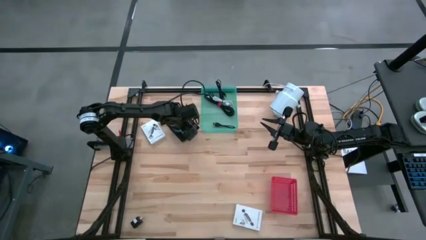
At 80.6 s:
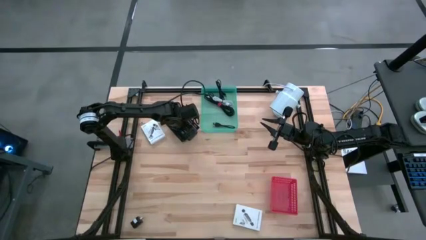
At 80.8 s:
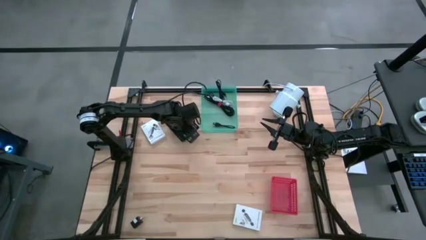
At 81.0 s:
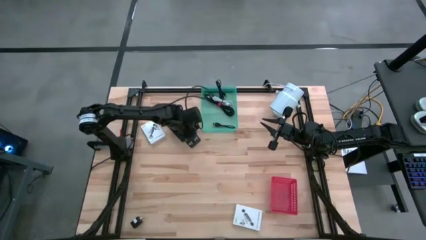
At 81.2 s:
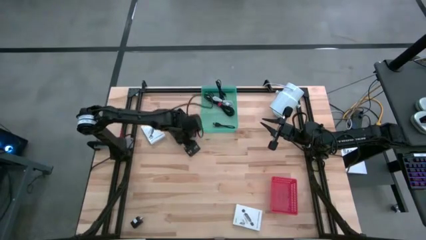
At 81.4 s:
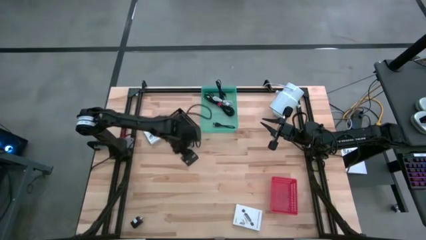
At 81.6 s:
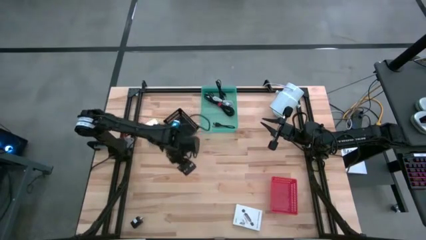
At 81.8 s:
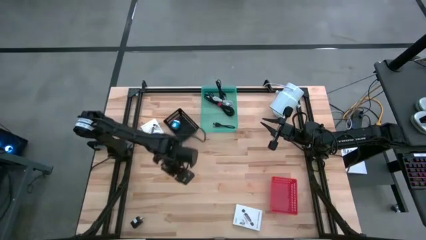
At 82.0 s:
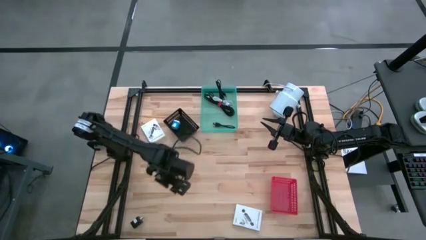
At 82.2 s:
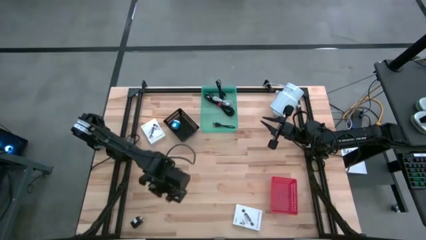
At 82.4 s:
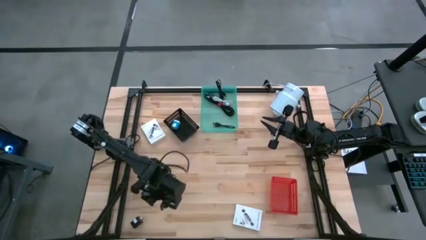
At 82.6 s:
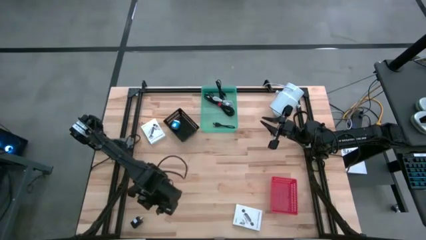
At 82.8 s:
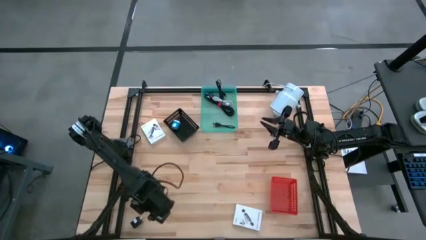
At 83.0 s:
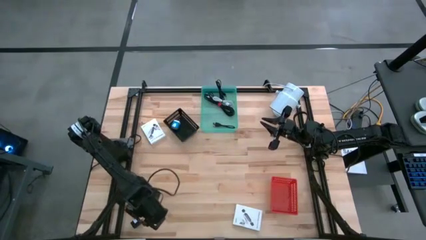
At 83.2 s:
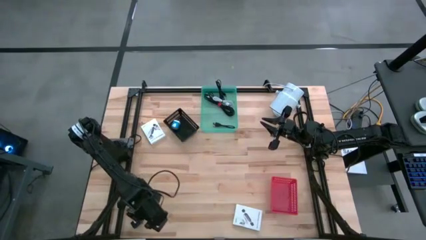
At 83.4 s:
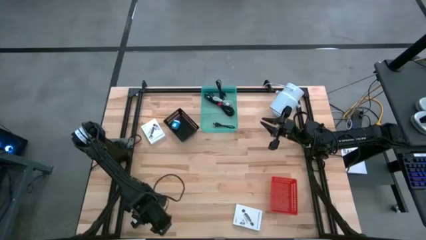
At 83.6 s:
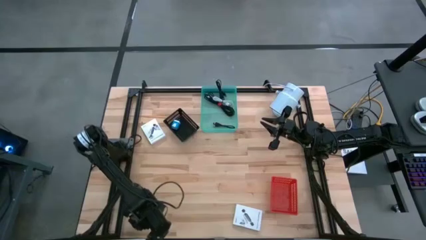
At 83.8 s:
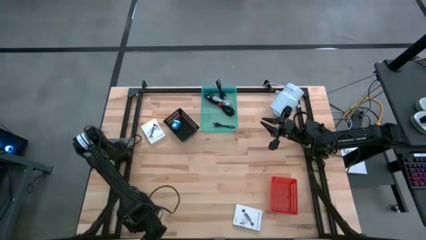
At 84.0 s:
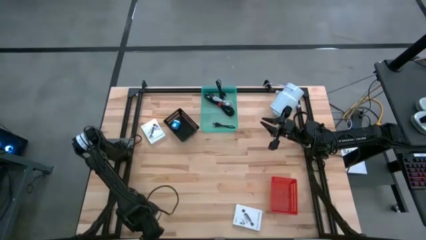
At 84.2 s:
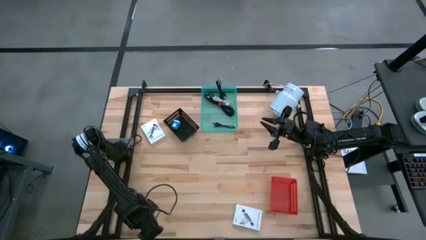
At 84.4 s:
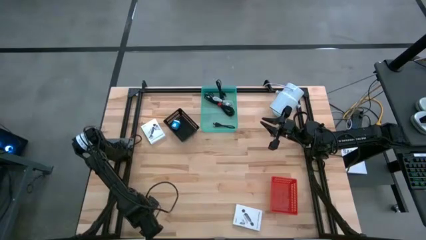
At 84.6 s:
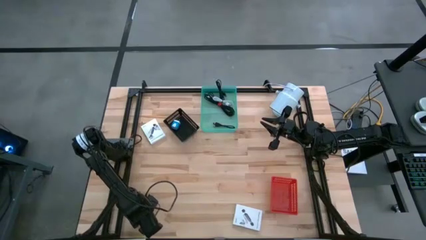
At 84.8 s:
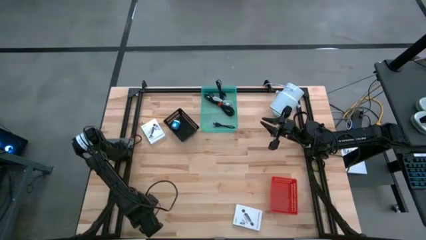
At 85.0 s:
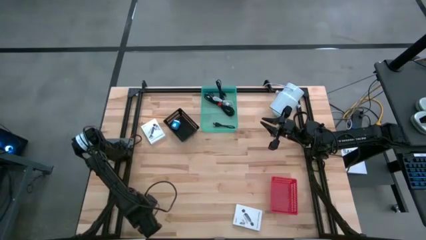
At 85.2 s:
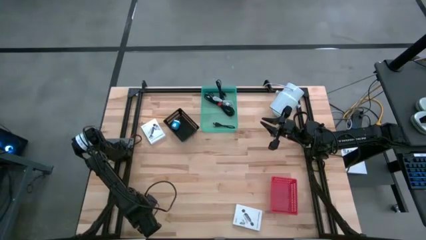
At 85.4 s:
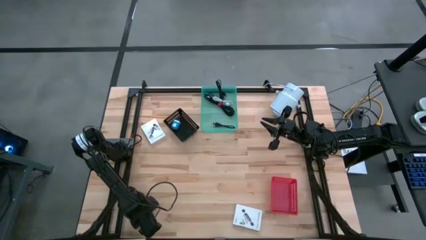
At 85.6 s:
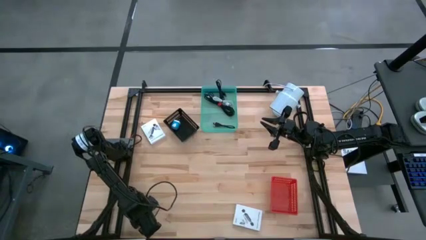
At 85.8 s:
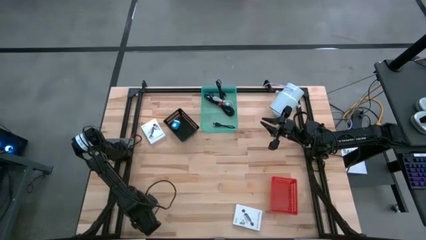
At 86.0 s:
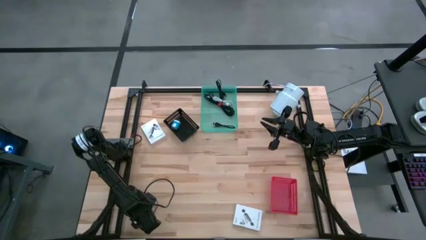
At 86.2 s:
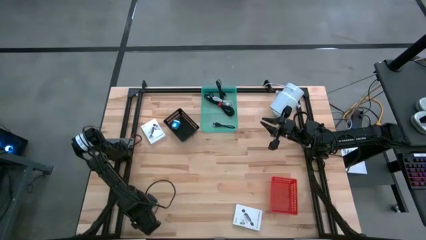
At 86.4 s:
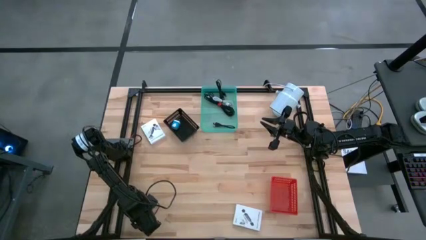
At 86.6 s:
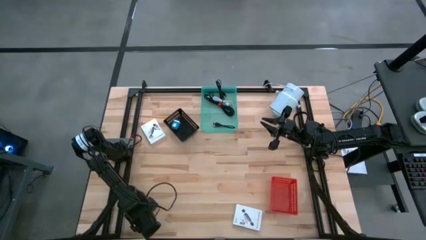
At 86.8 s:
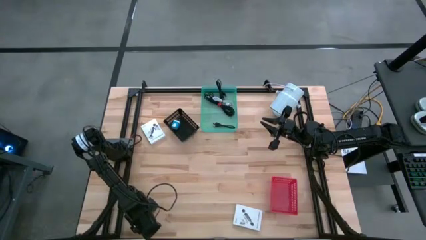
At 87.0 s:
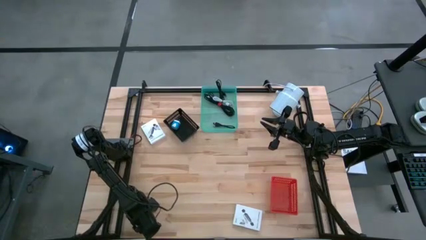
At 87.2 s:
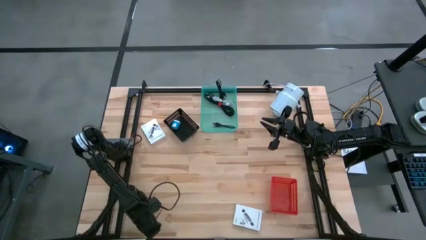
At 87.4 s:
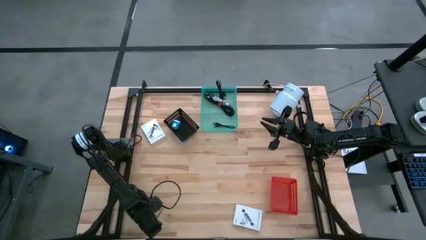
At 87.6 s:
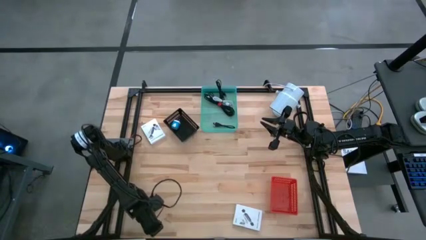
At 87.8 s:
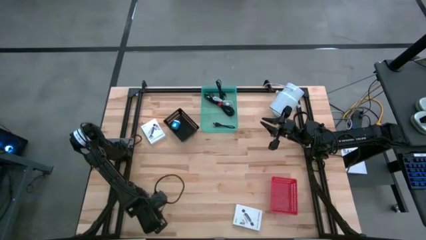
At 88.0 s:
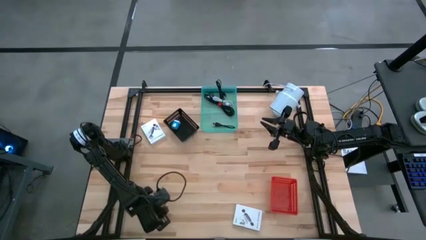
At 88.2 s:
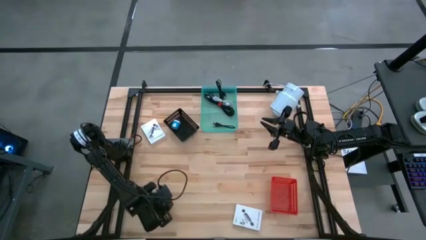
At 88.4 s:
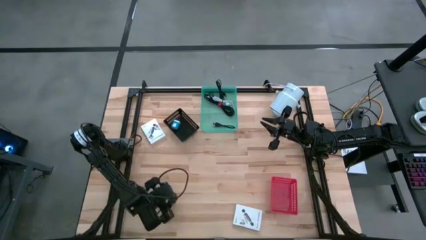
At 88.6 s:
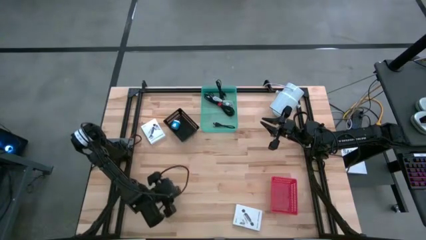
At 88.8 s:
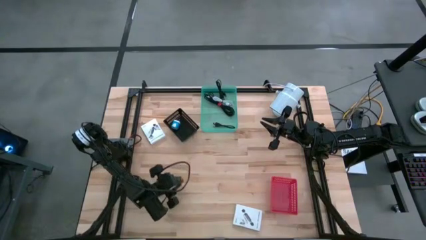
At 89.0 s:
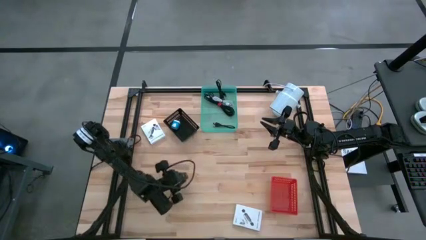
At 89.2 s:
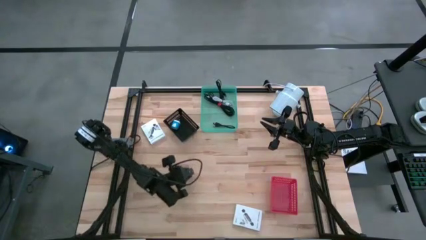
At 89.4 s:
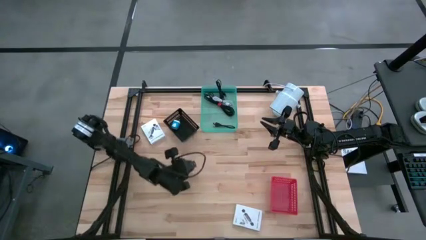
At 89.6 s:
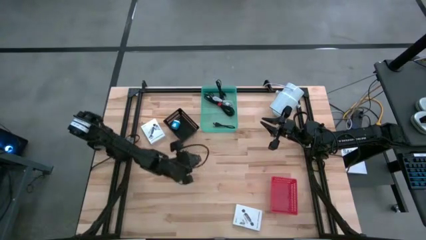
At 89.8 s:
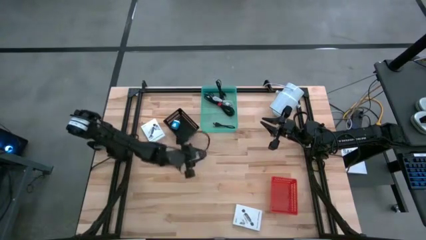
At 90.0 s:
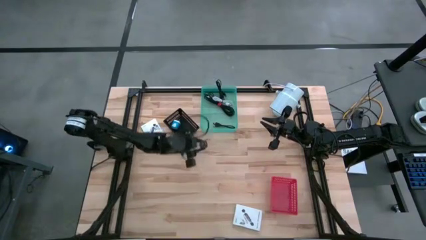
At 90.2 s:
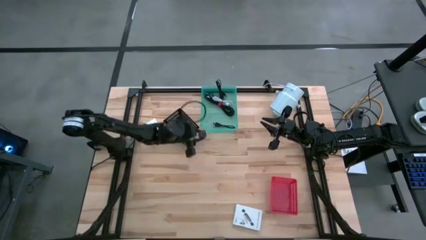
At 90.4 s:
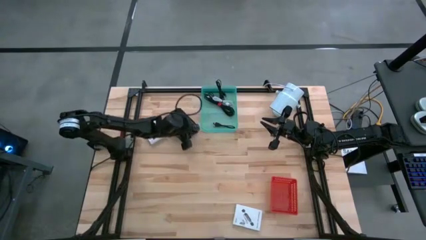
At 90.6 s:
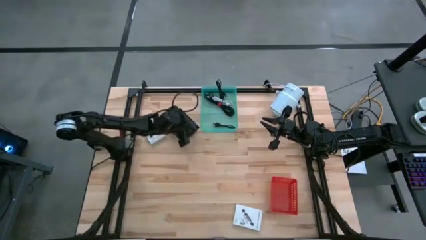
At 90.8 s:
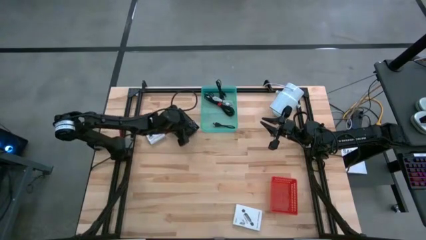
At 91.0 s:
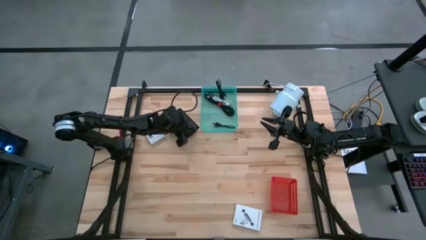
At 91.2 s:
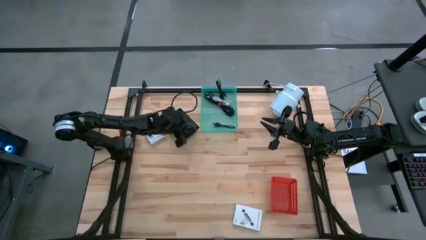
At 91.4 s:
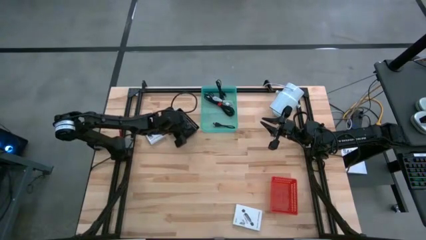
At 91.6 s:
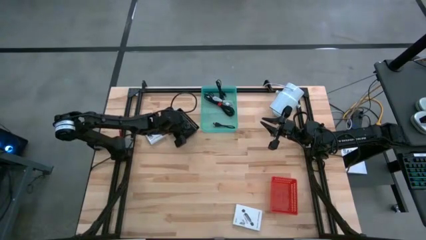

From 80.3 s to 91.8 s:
Task: Pick and place items into bin
Put the black charger adapter into the black bin
